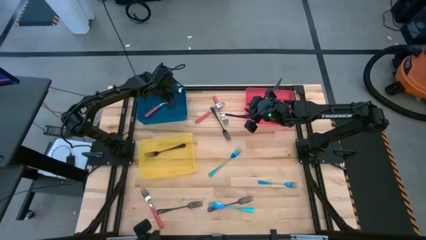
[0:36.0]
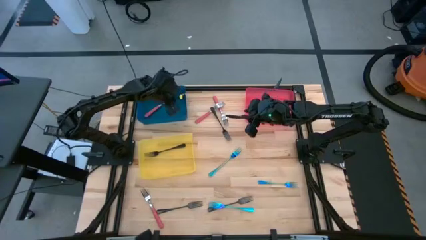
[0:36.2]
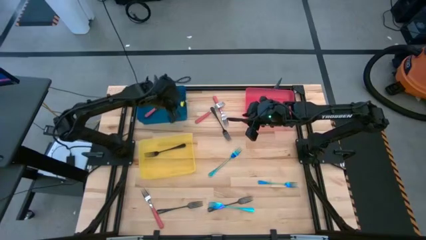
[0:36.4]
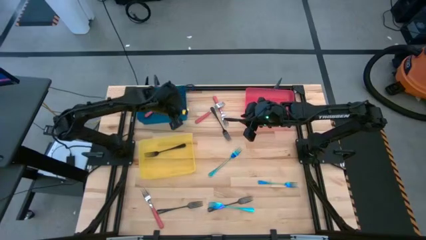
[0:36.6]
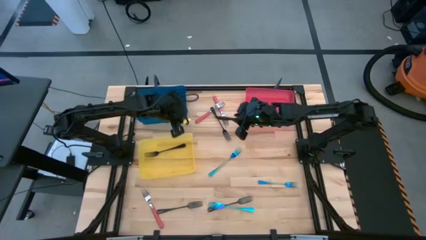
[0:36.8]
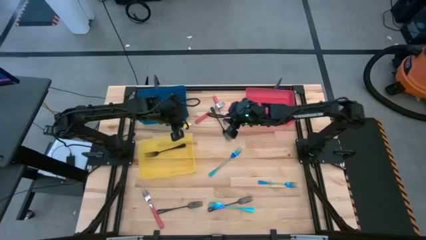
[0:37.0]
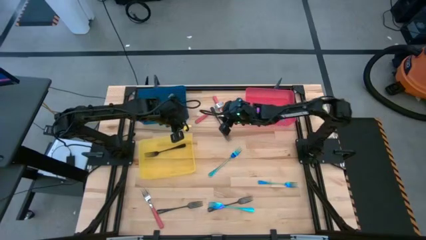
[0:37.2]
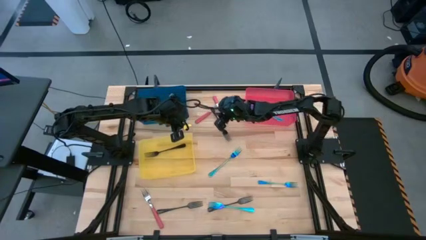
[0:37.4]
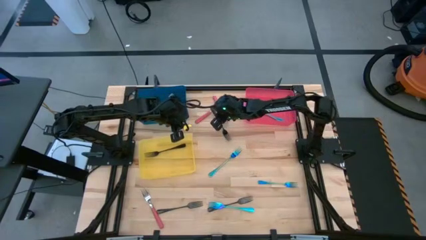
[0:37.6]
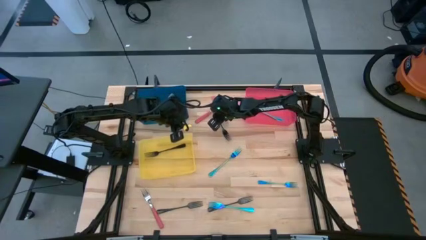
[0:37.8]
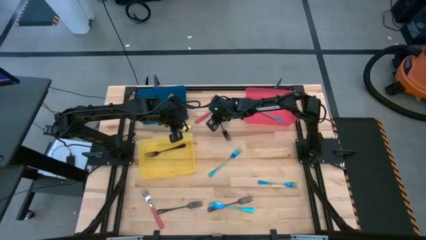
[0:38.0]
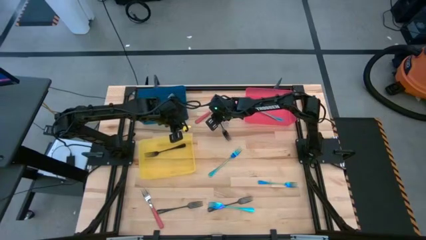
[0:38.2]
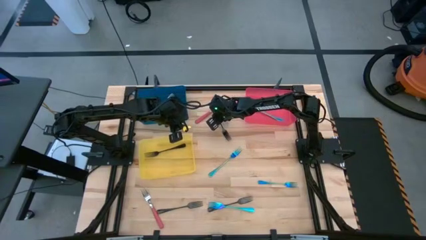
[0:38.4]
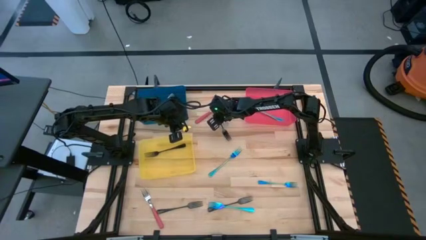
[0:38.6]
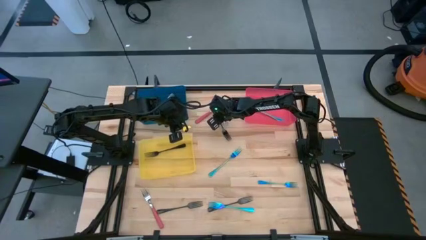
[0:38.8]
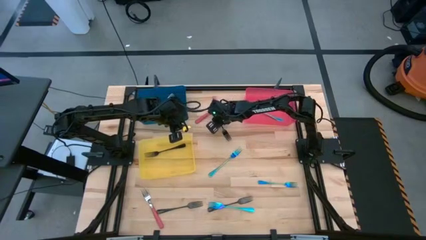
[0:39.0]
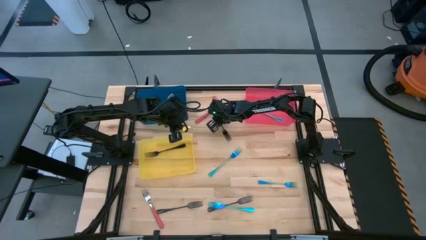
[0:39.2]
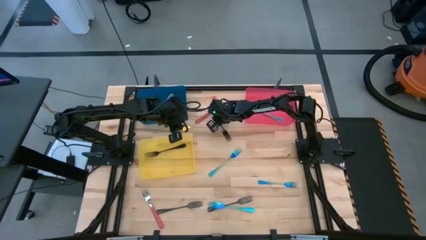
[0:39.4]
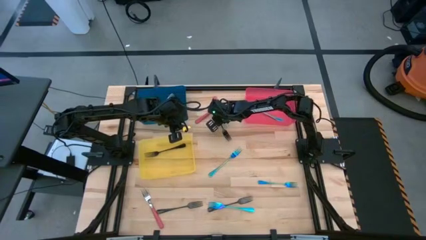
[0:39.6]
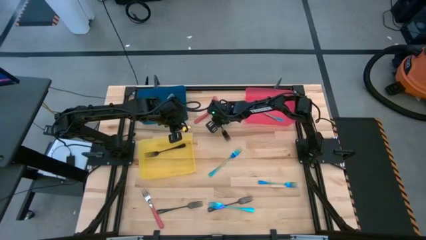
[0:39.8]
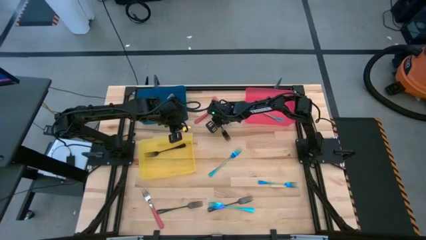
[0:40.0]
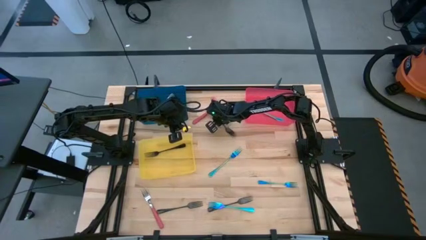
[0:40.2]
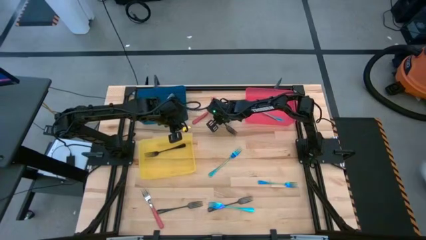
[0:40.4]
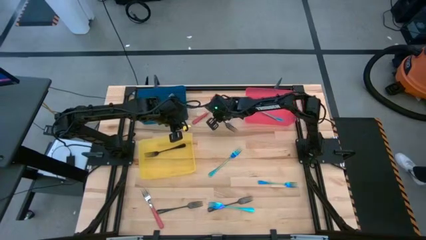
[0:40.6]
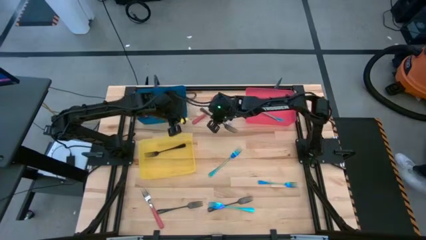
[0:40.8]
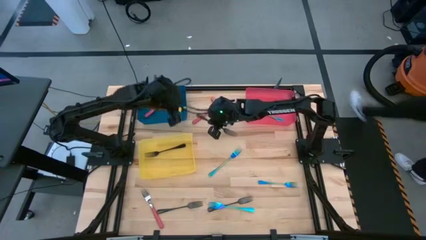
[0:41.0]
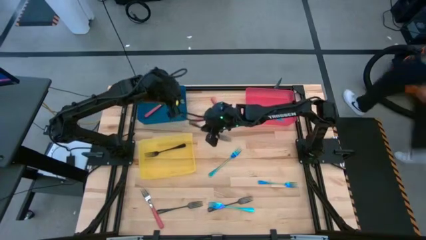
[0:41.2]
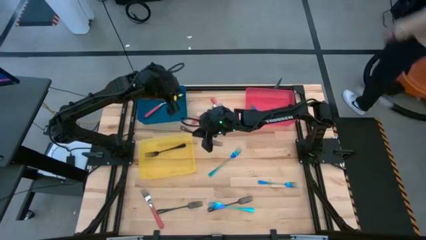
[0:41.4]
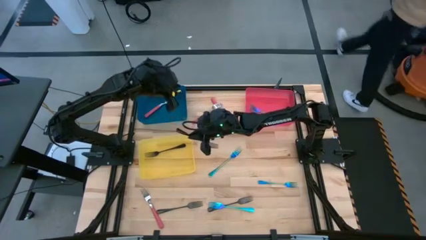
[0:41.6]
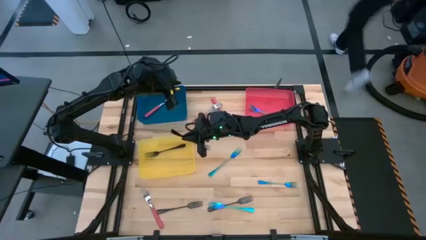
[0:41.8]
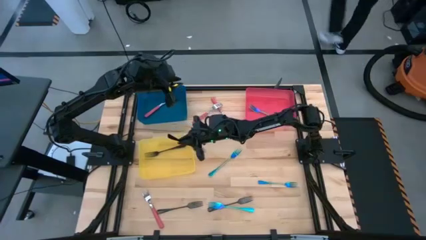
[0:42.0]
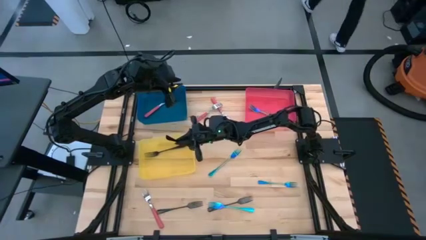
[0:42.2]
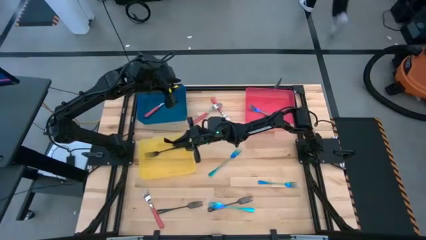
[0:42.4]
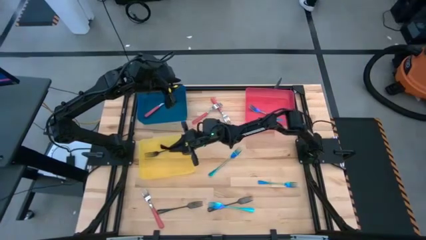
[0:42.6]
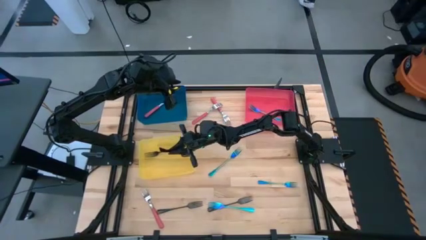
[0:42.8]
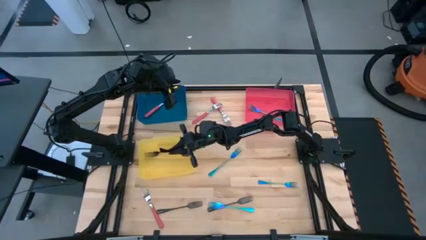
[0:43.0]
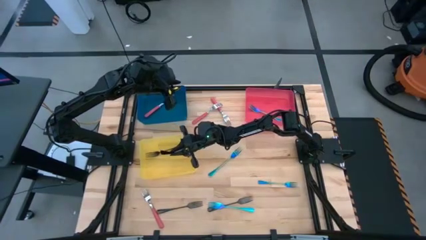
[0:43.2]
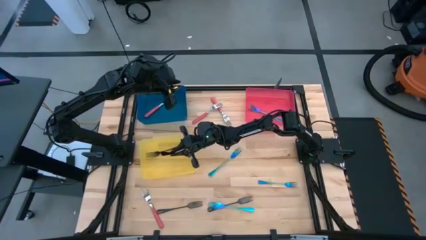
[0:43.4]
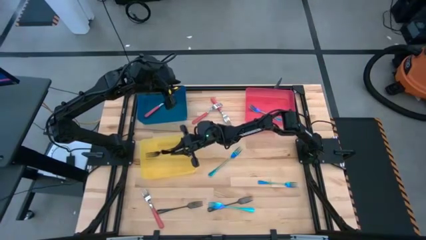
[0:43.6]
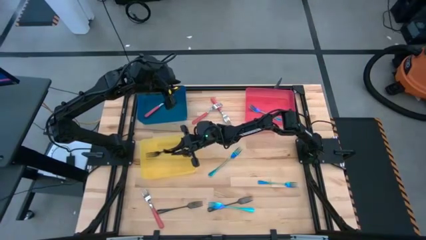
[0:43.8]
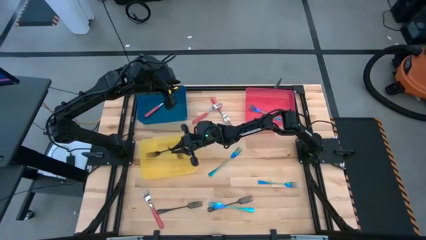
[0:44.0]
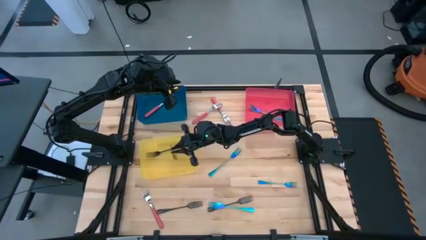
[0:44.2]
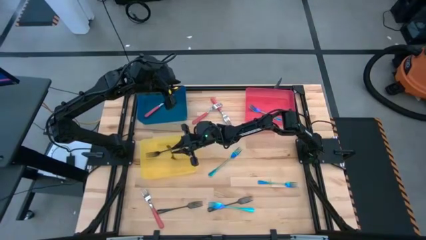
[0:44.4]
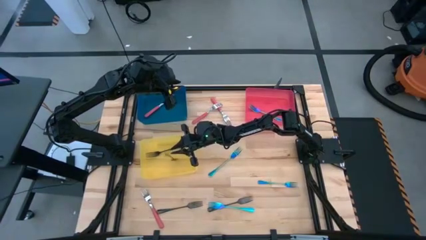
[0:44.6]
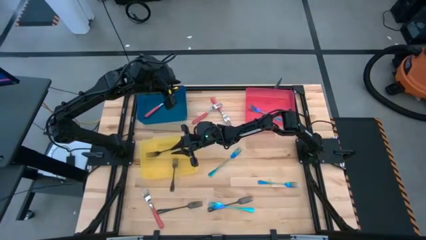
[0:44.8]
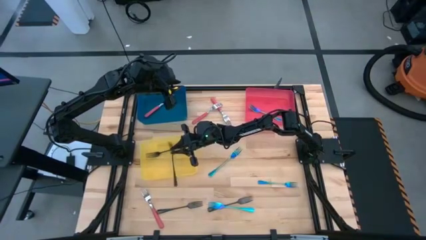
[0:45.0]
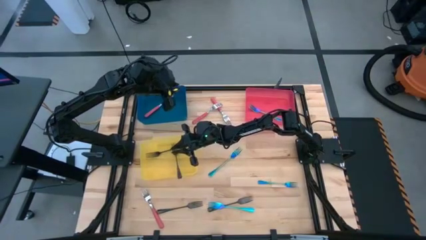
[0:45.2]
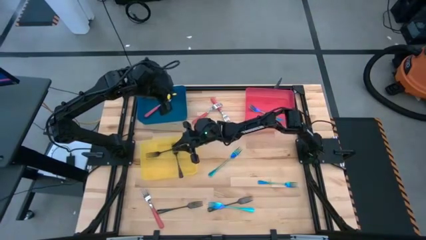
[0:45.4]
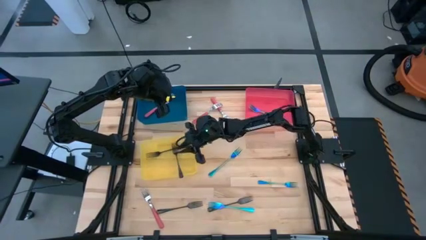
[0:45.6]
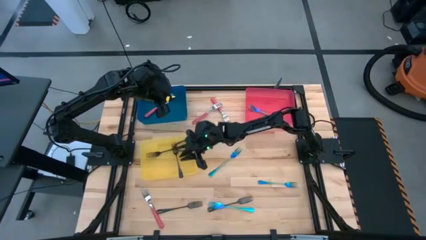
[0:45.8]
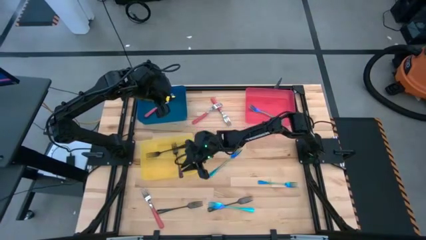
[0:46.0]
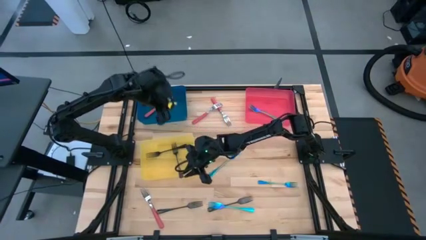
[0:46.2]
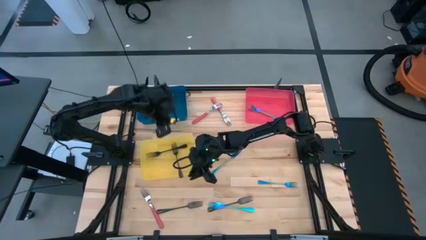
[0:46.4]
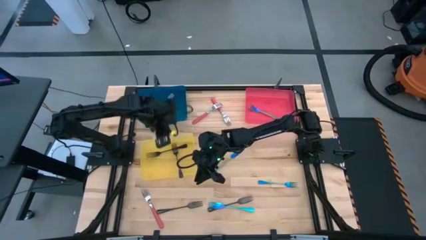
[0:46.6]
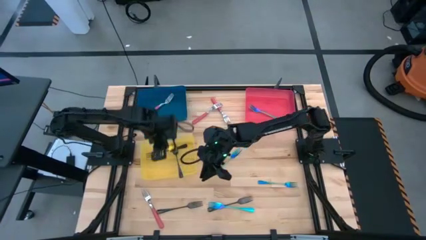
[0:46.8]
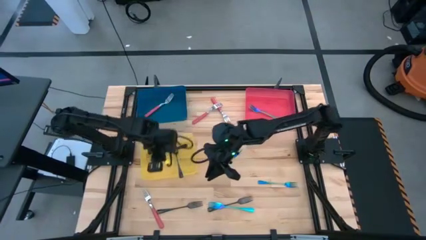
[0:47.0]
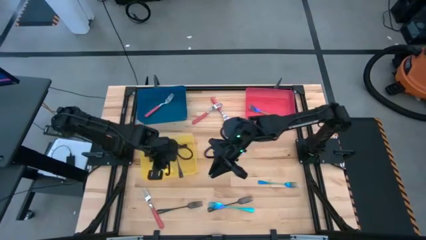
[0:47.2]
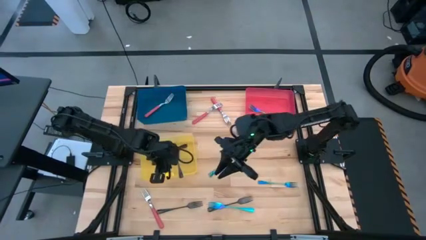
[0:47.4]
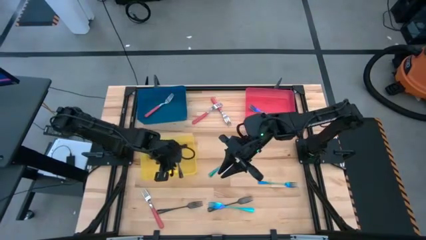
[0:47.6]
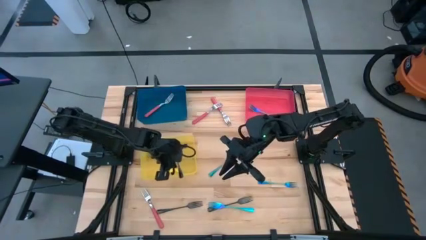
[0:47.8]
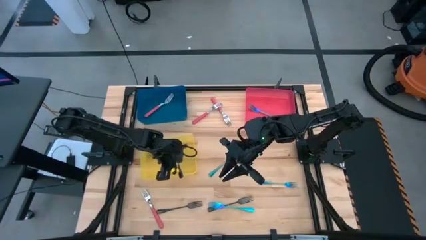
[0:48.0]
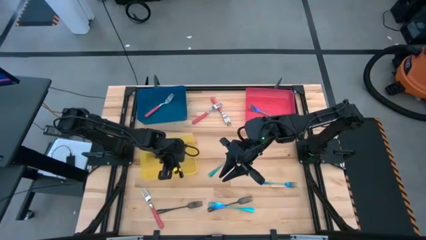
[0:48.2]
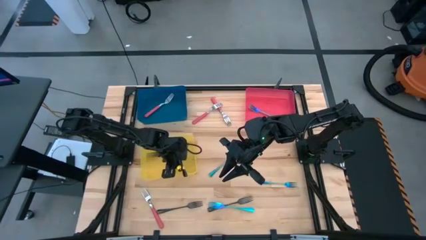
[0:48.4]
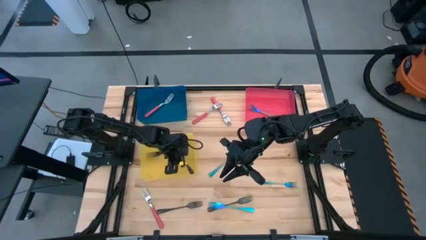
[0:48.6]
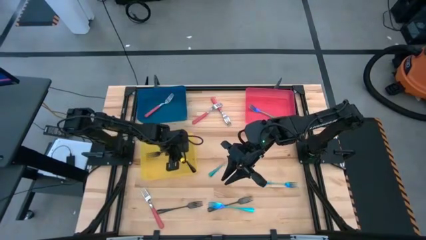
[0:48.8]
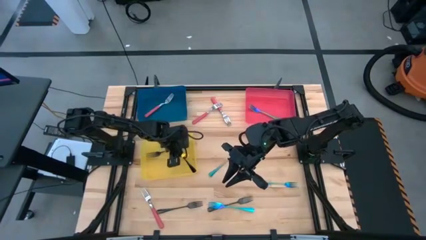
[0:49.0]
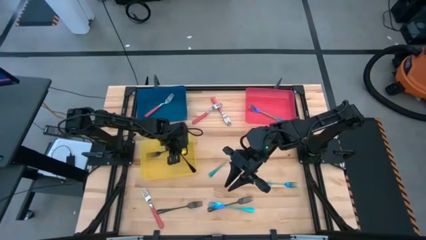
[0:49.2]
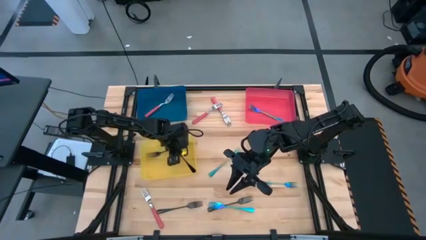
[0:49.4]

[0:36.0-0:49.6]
Task: Sort silverware by color (type)
Put the top black fork into the yellow bin

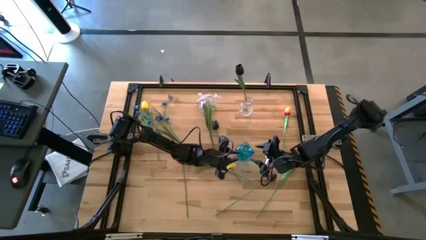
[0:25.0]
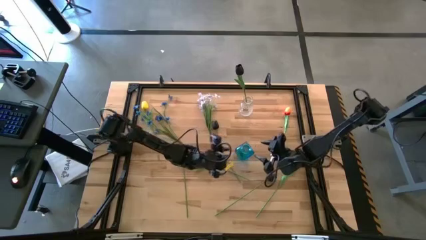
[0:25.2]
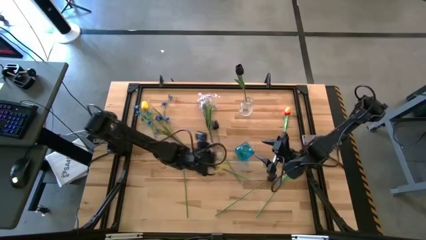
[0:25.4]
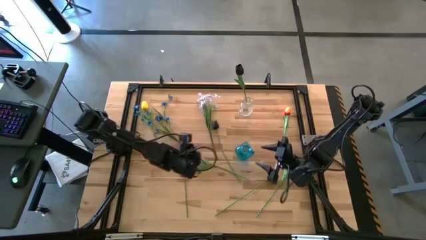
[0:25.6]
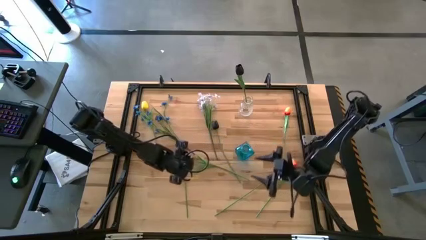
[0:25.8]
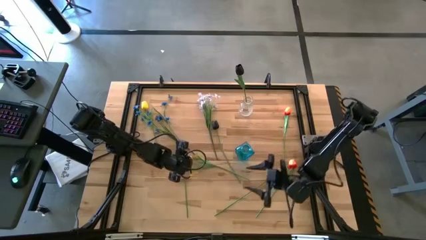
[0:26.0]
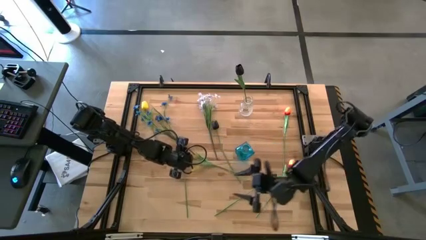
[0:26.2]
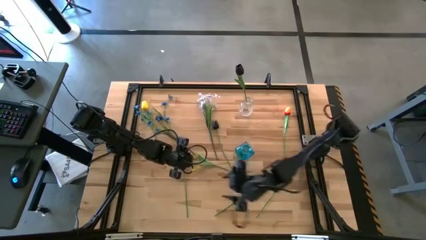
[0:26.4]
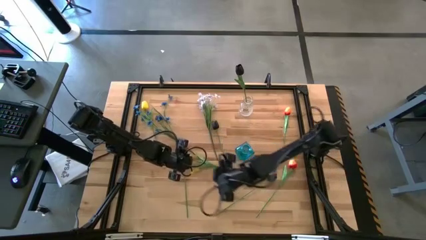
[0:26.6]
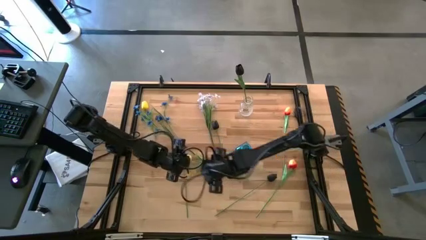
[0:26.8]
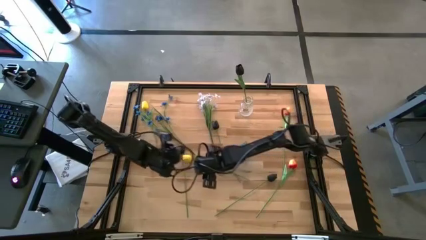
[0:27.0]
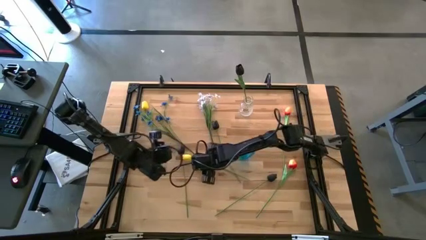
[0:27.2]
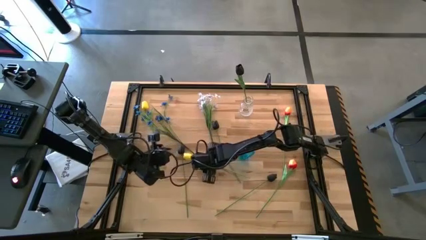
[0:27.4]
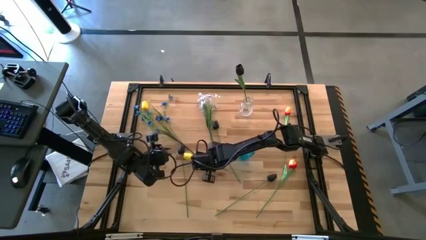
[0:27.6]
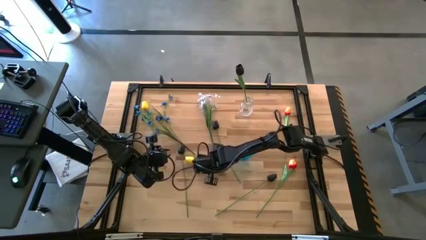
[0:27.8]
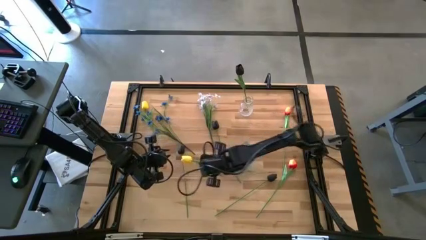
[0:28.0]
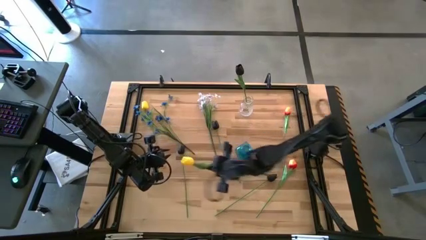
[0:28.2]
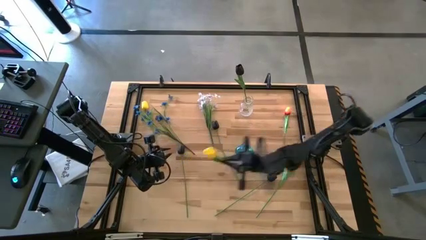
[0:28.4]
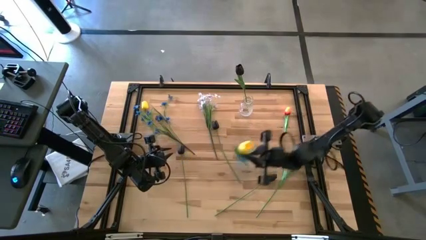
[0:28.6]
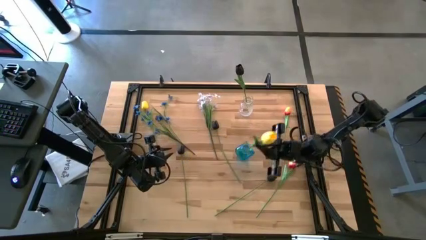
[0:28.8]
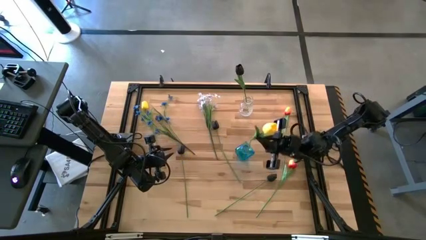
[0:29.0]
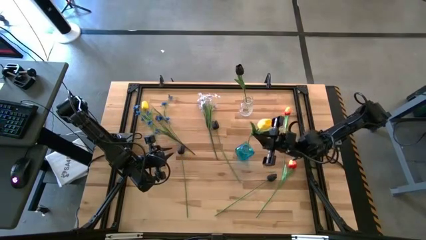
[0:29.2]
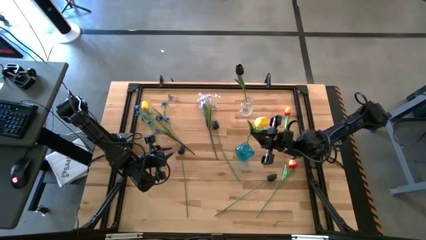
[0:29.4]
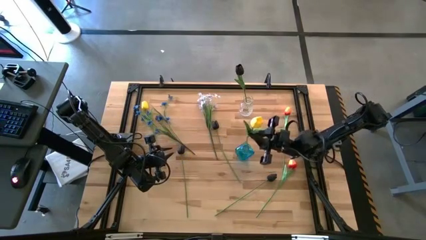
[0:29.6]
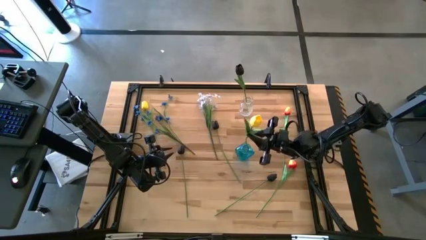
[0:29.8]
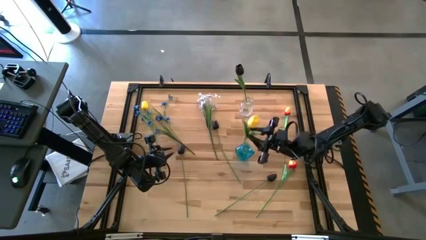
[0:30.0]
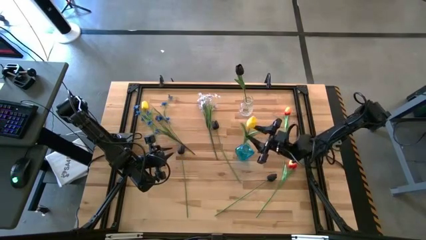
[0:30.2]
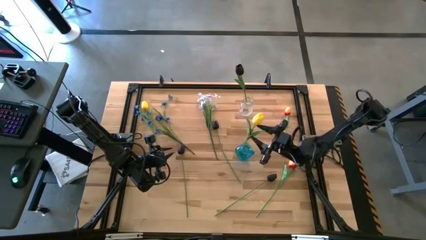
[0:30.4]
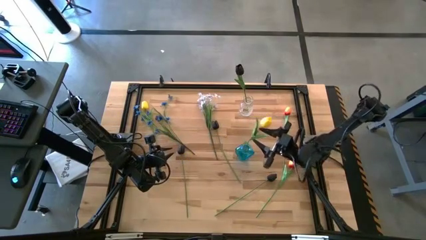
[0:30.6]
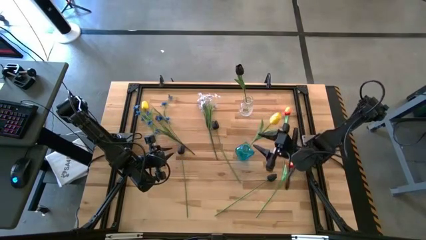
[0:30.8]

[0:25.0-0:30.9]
Task: Sort flowers into vase by color
Put the yellow tulip into the blue flower vase
